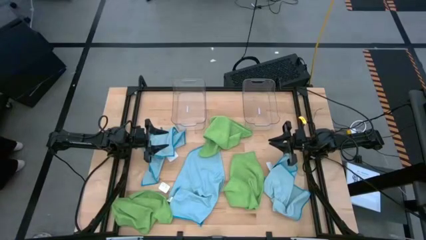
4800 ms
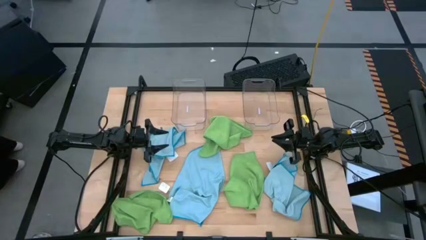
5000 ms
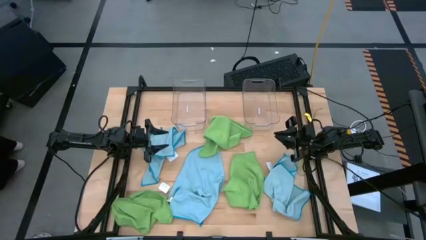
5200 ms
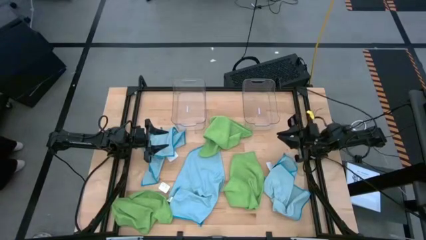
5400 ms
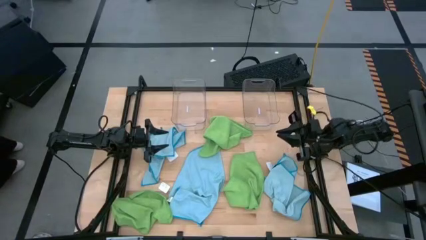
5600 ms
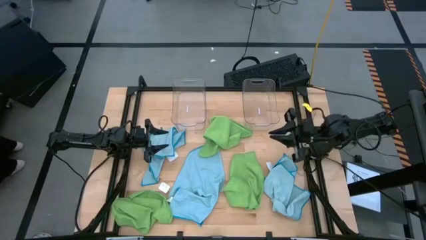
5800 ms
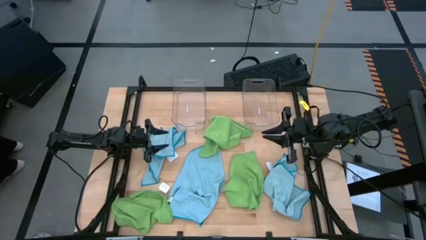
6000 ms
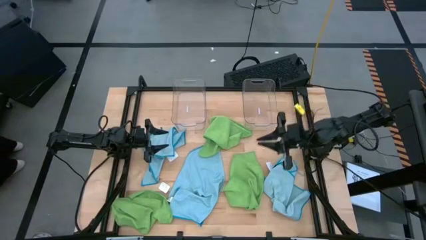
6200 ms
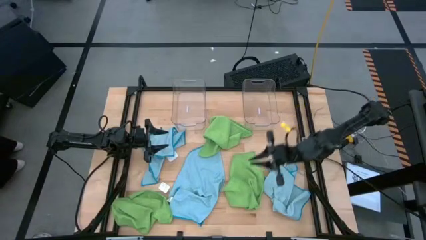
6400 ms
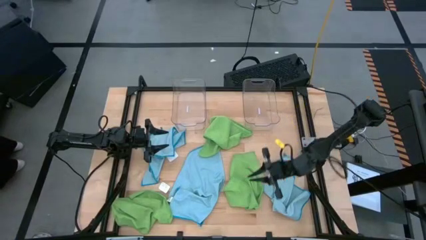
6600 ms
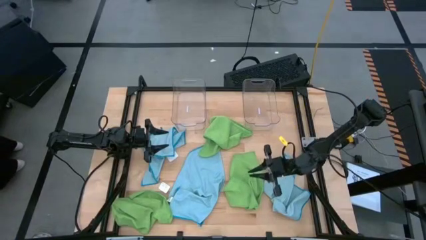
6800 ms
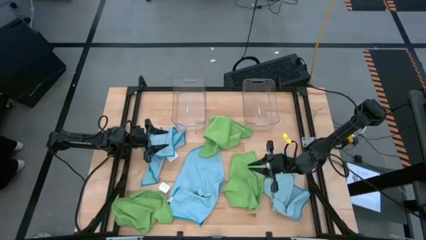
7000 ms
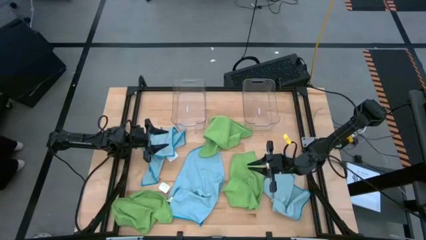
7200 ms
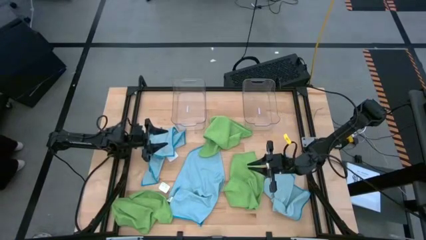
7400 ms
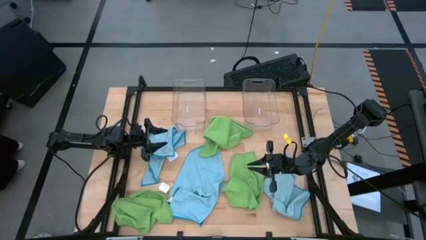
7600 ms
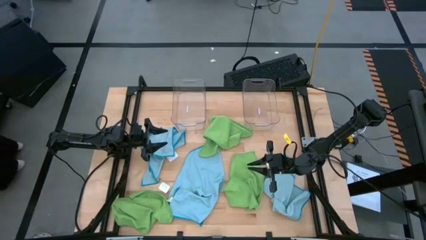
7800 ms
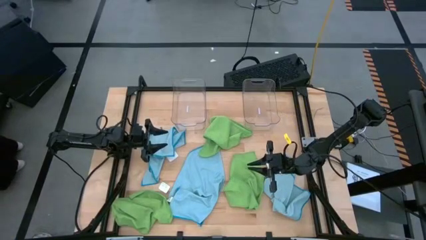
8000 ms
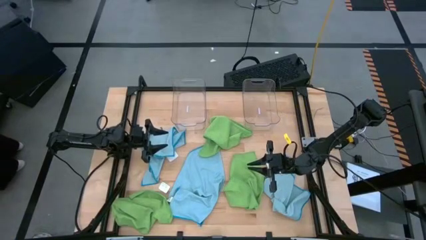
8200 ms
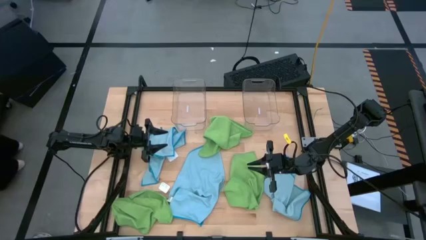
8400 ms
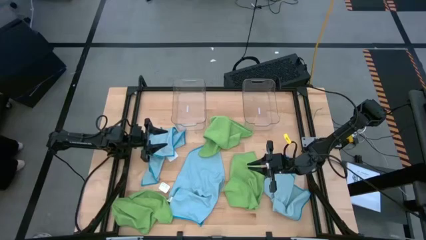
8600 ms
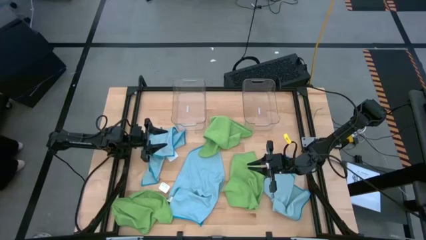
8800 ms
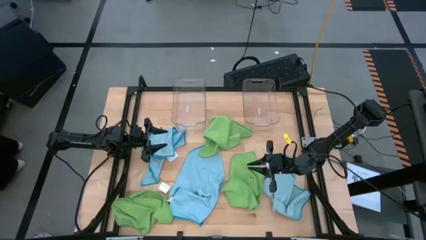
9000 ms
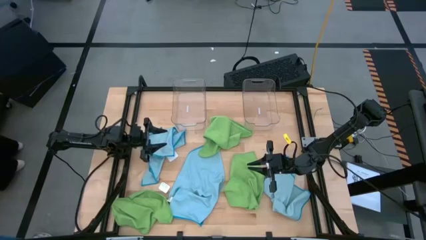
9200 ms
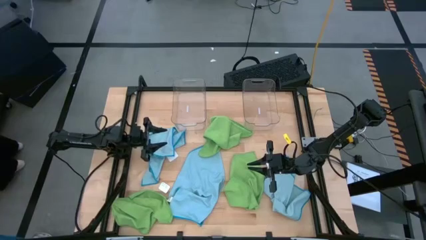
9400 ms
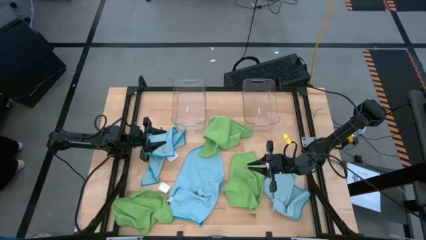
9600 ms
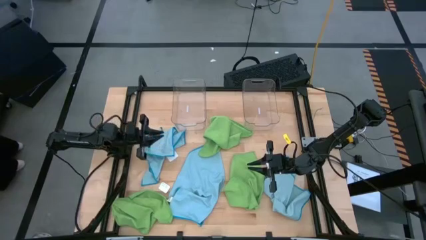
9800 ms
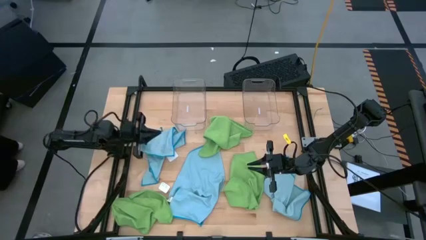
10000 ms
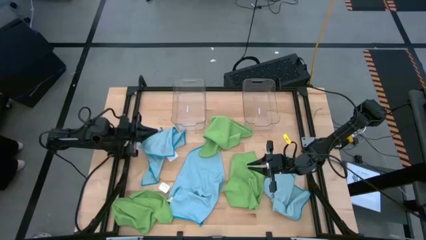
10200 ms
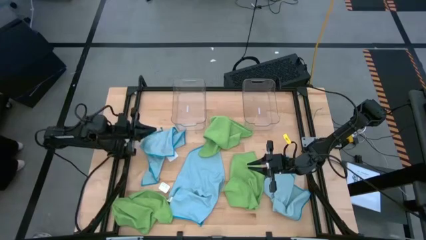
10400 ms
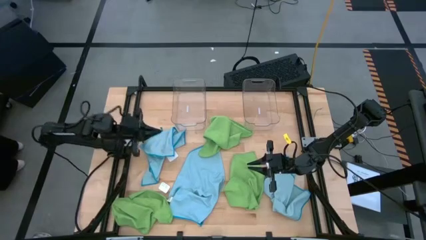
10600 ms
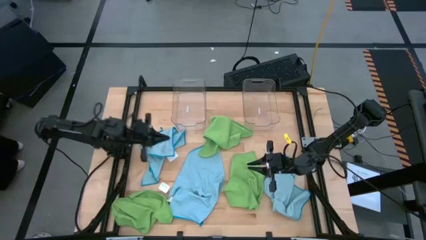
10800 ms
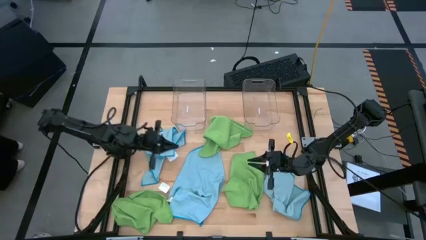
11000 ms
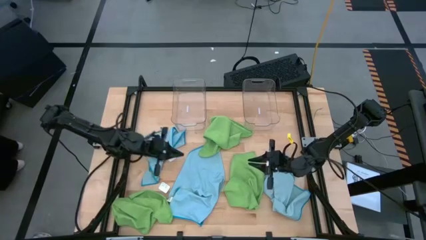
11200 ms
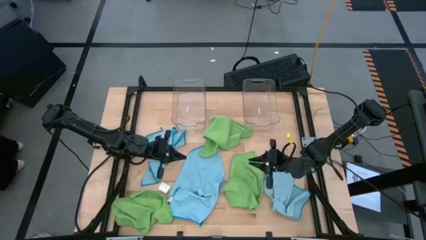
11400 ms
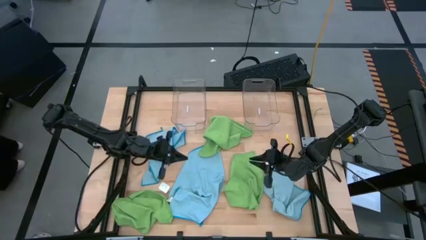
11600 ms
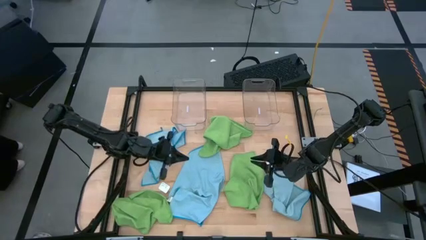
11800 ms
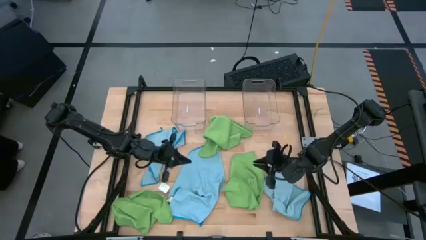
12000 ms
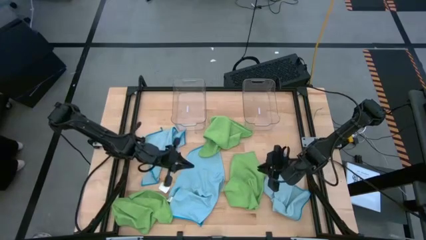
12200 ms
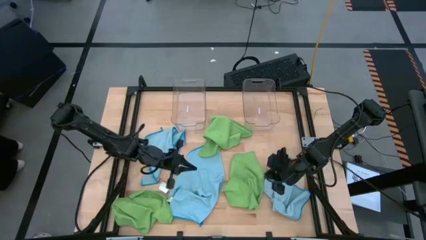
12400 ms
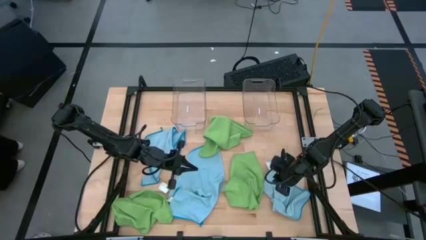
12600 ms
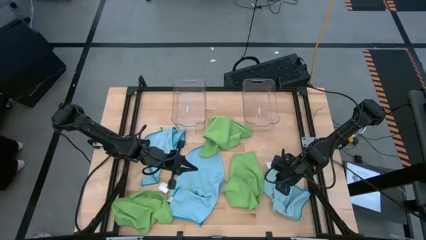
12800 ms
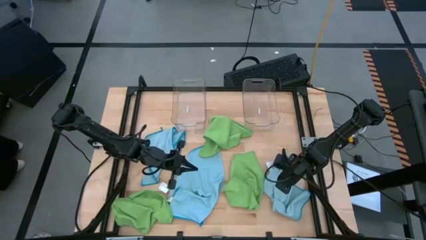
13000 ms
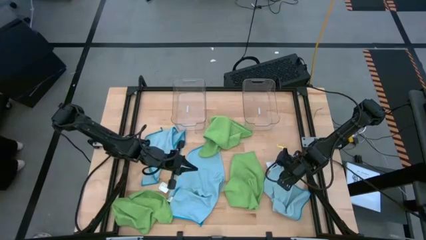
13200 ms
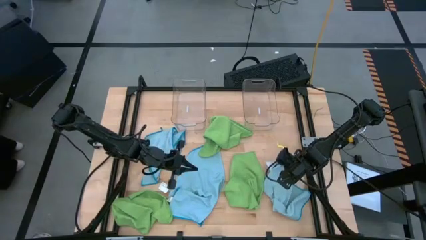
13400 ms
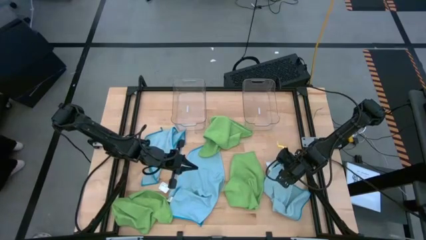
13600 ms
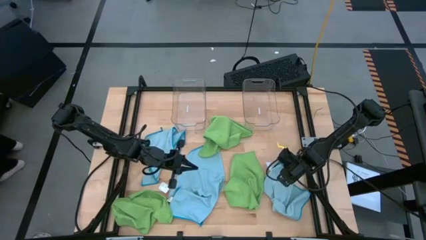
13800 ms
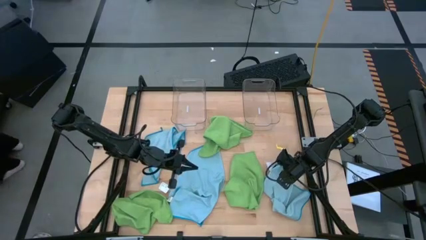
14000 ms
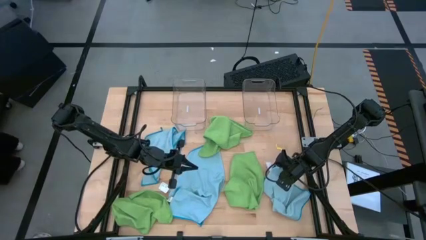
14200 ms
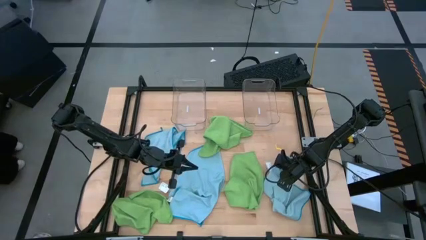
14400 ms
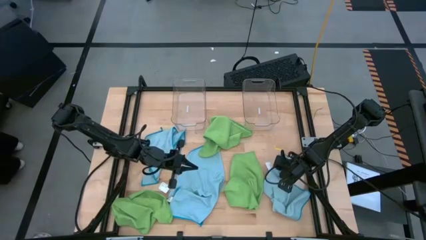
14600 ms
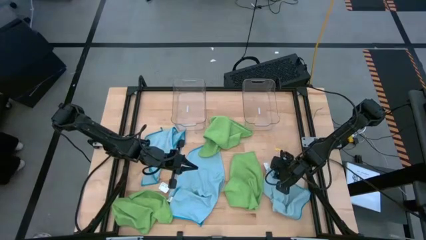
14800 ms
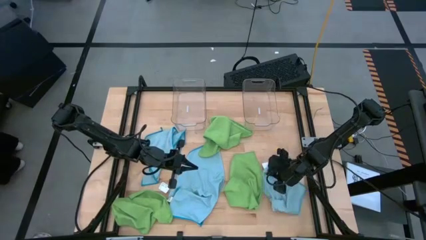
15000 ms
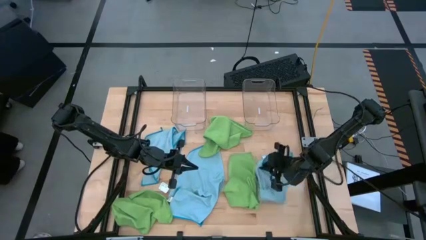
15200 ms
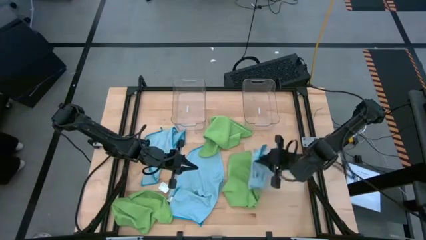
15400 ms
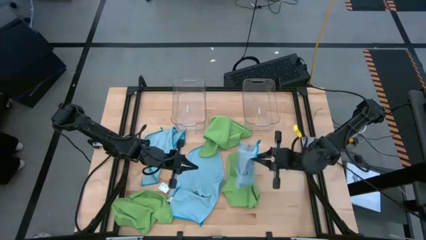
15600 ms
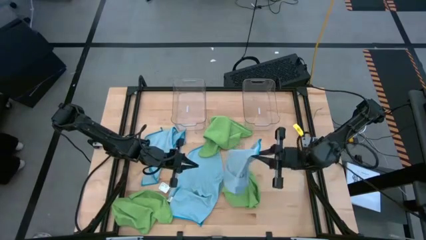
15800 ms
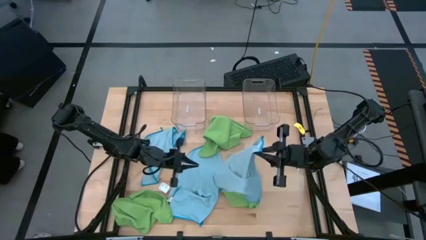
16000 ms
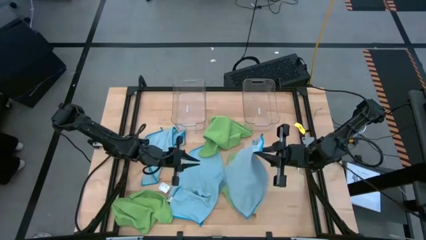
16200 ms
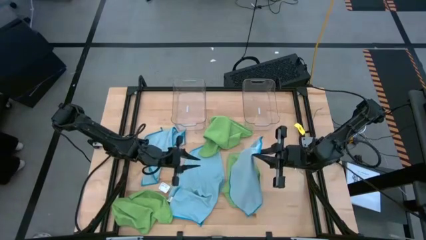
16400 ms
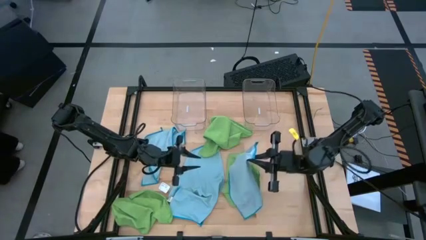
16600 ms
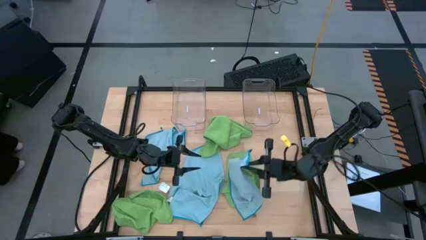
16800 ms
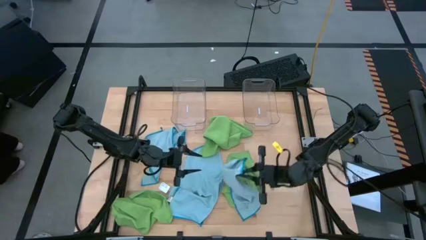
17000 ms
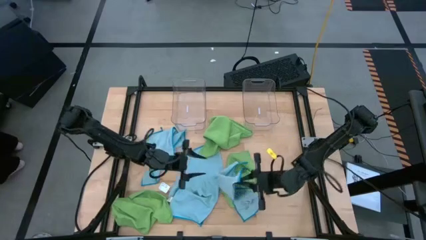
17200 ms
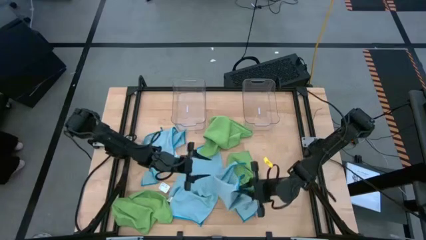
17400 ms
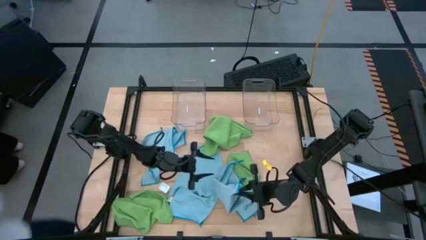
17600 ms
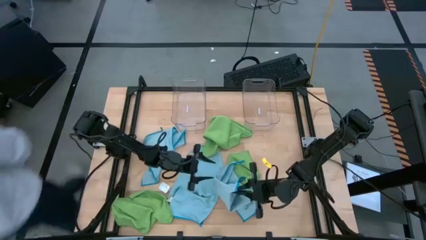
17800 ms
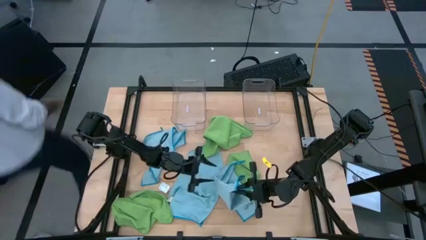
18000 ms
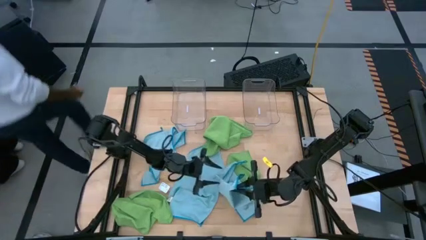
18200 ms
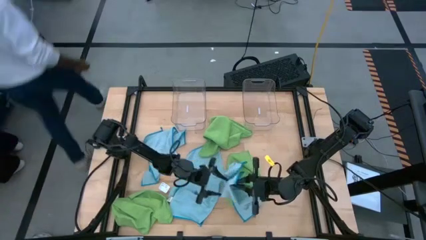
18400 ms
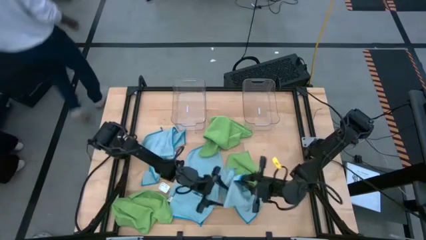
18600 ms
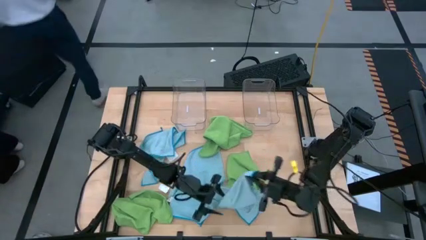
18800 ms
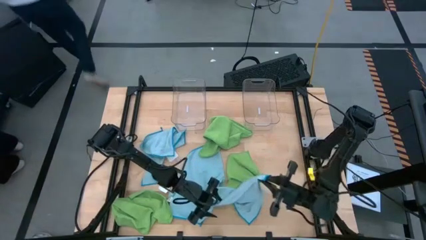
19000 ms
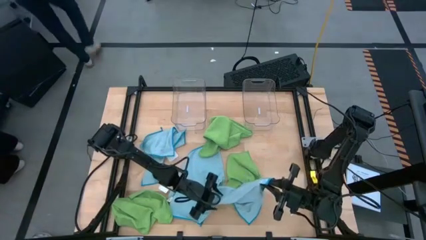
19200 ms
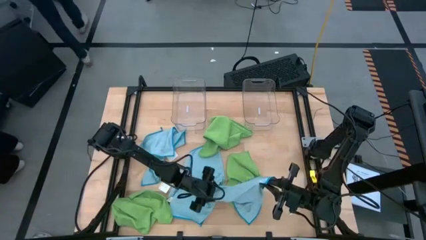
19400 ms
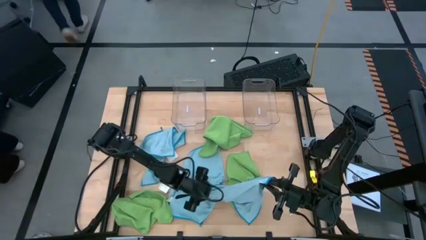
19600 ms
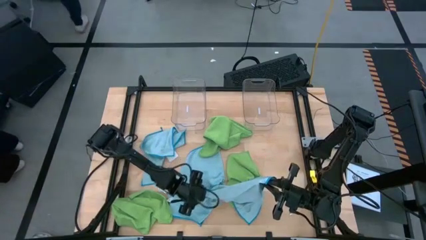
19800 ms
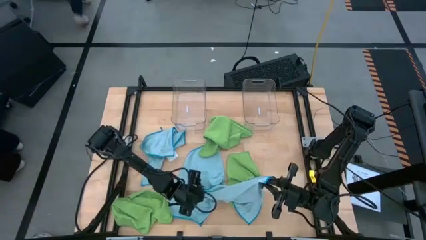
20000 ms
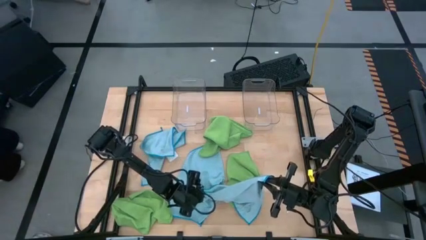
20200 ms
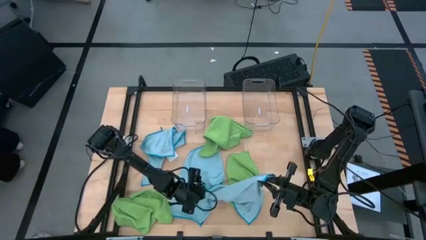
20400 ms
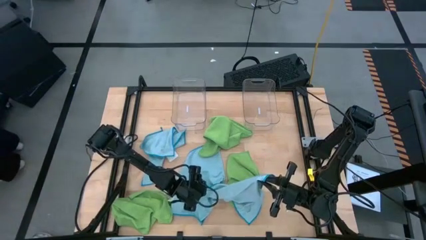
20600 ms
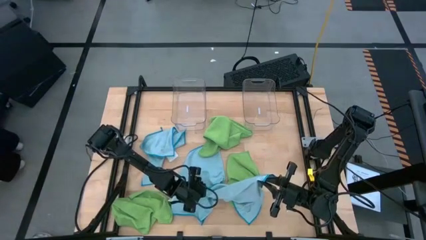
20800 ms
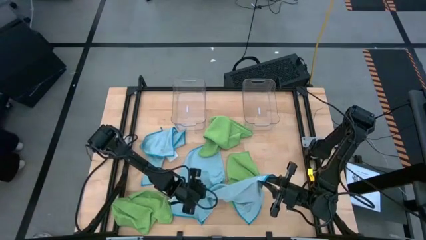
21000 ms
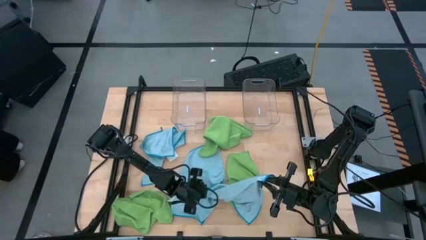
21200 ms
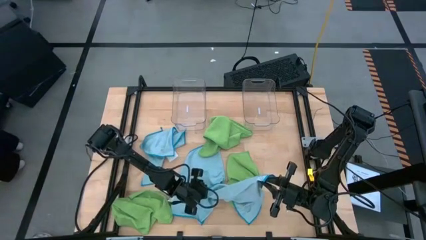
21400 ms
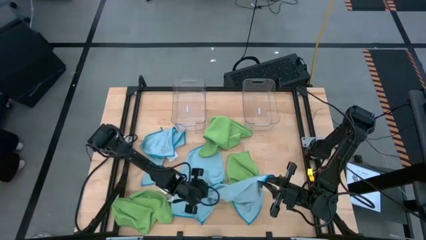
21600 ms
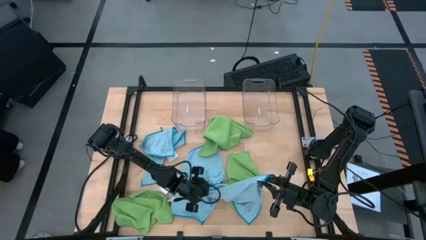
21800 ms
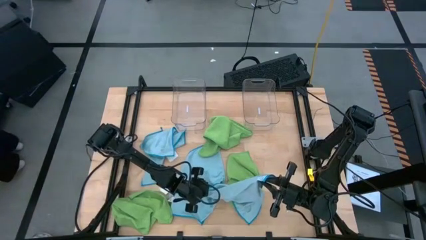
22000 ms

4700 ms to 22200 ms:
Task: Fold microfiber towels
Fold the right blue microfiber towel
